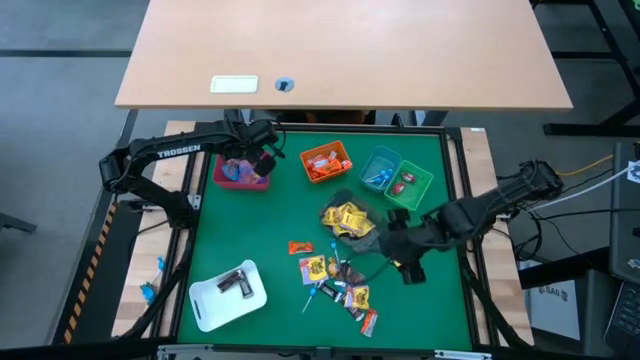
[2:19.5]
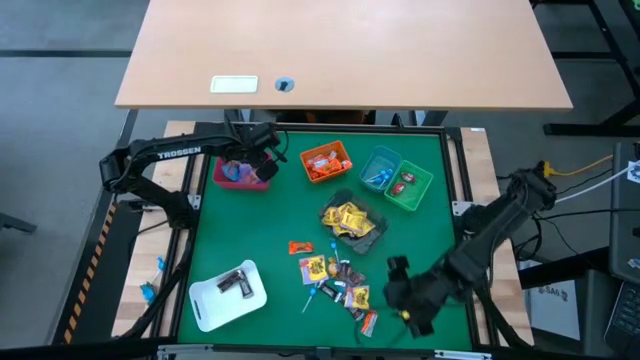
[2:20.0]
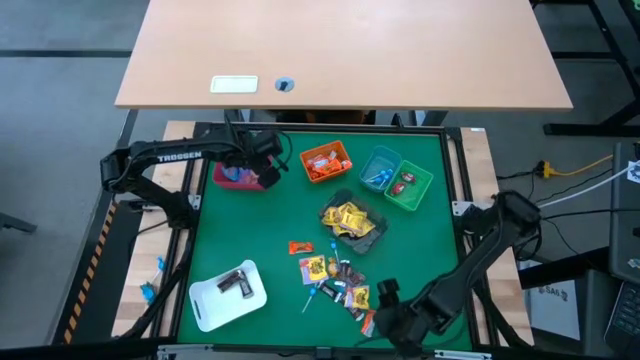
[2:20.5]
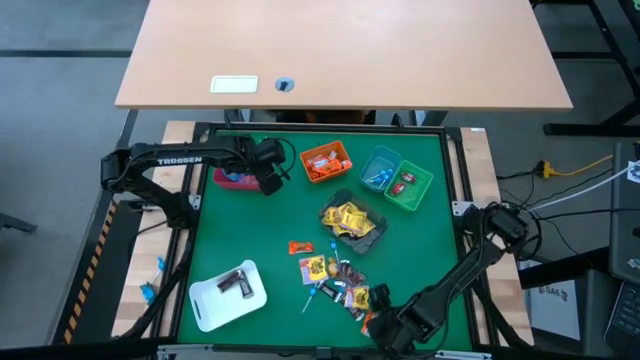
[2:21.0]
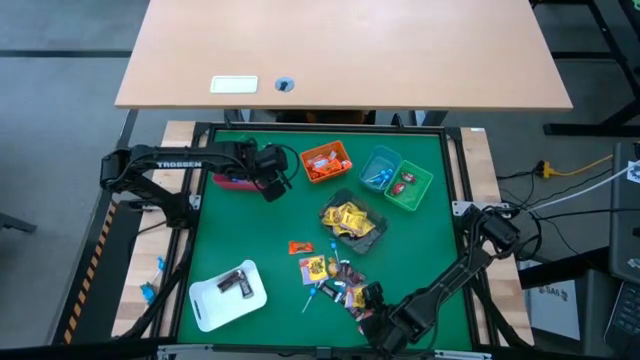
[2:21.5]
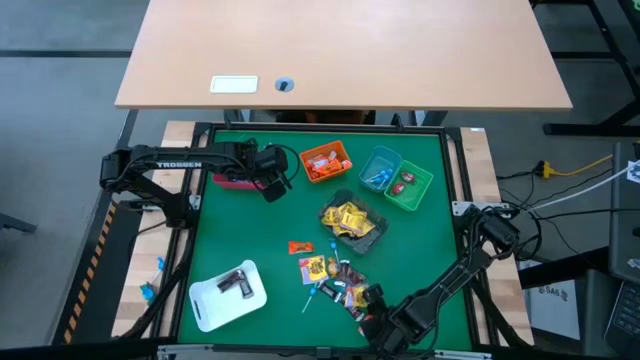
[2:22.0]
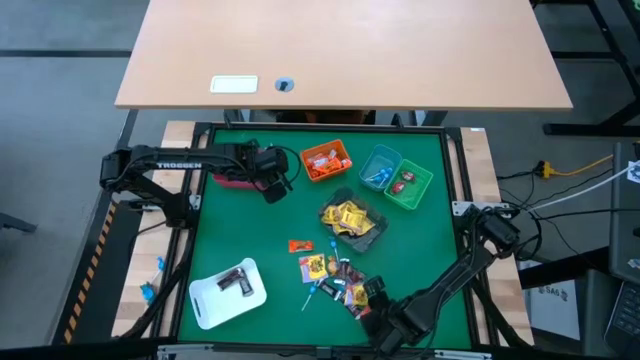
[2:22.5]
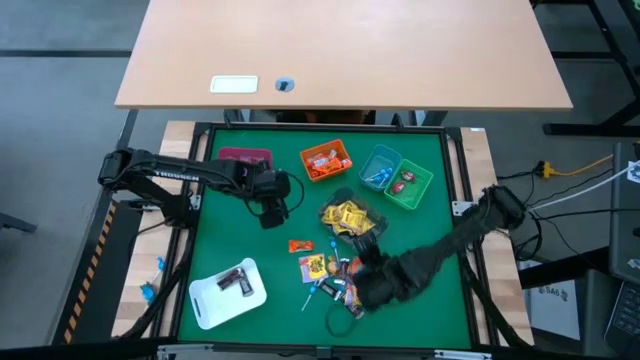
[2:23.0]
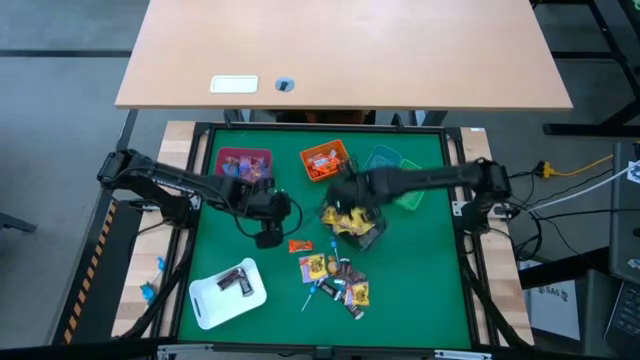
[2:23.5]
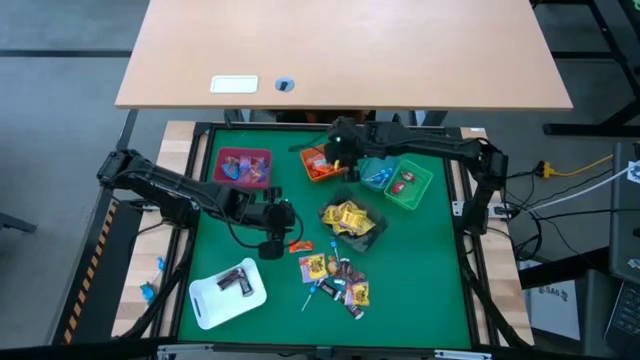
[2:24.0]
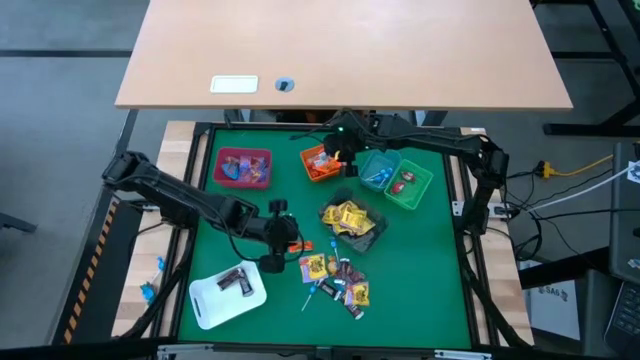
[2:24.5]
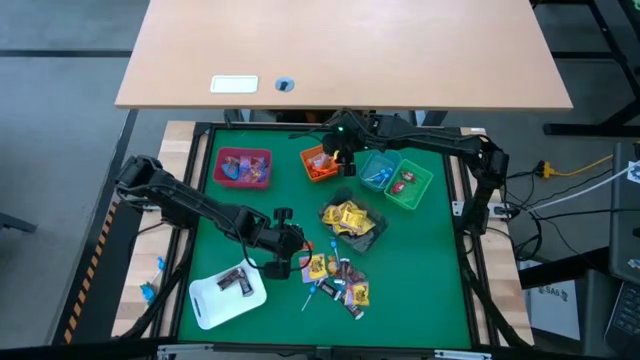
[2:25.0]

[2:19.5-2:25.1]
Task: Sort candy
Put the orange chocolate into the orange bin

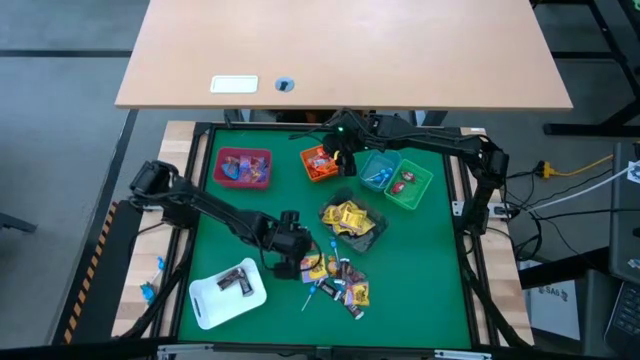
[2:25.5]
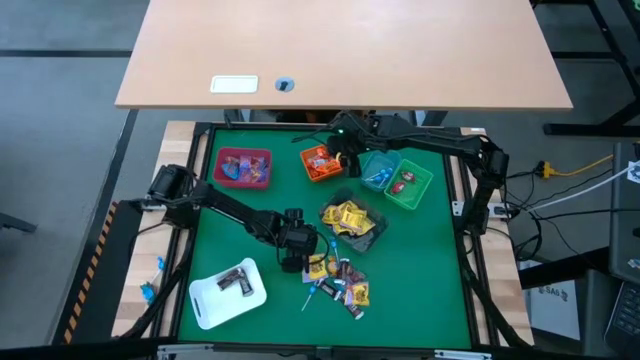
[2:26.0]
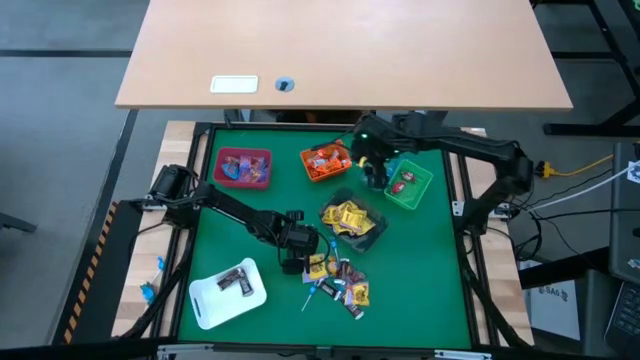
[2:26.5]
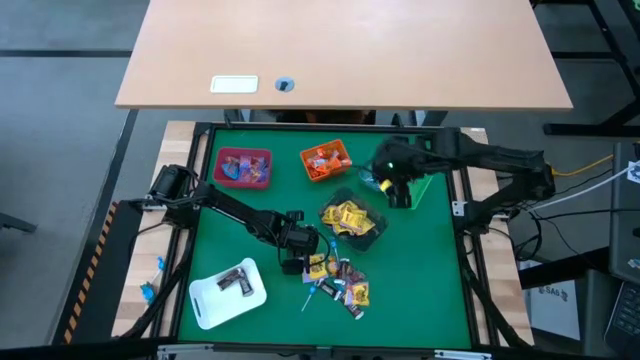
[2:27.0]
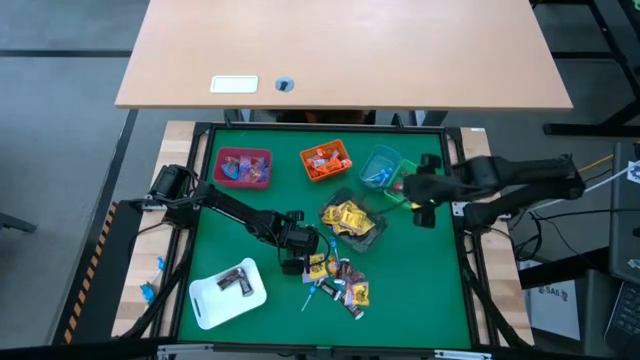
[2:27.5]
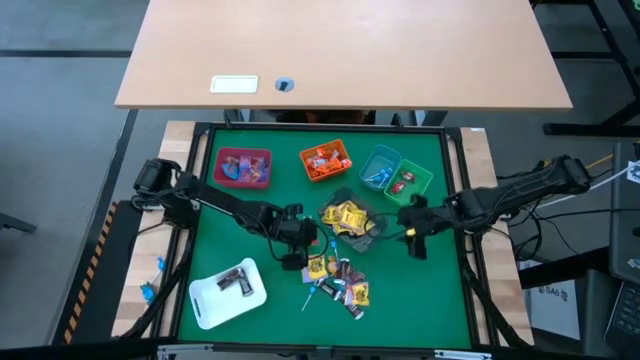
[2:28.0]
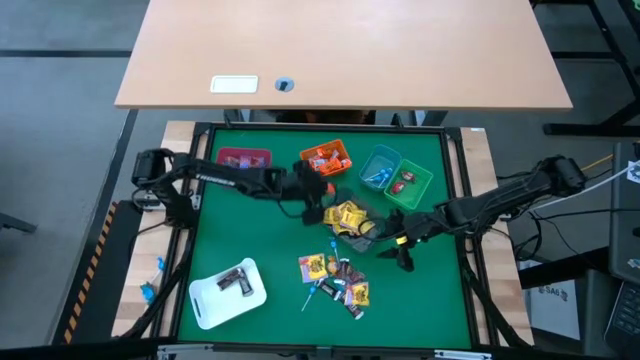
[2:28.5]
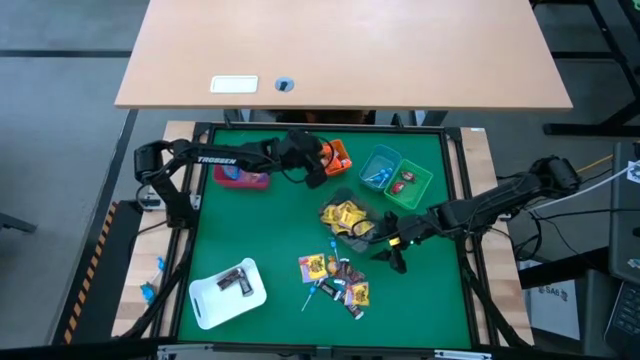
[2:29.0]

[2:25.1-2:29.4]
Put the orange chocolate into the orange bin

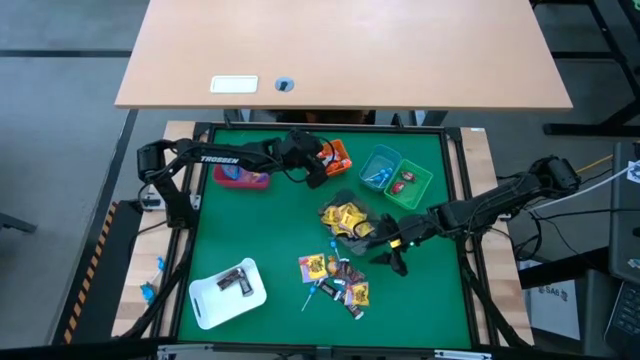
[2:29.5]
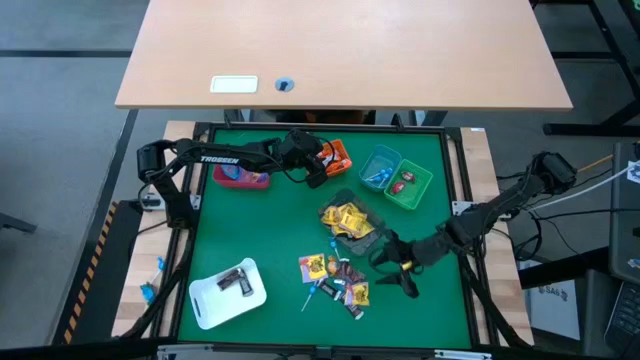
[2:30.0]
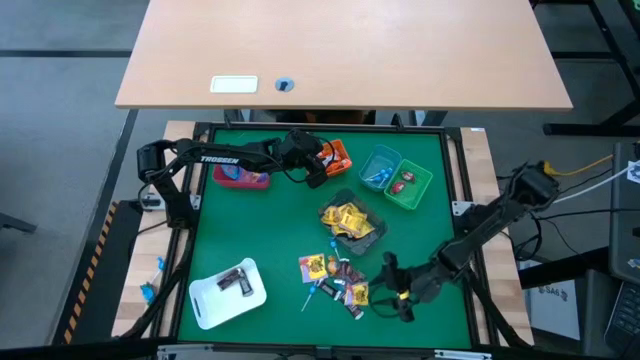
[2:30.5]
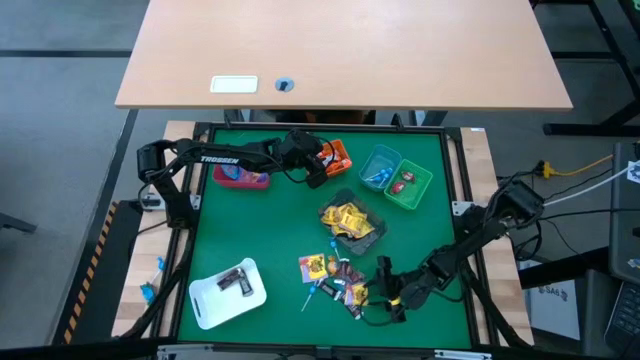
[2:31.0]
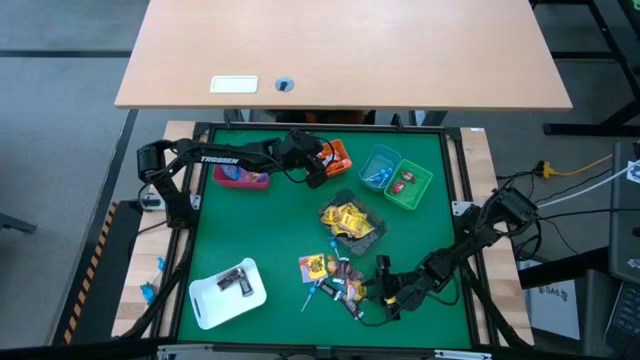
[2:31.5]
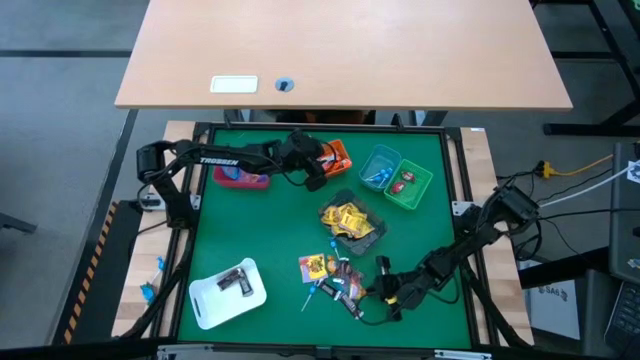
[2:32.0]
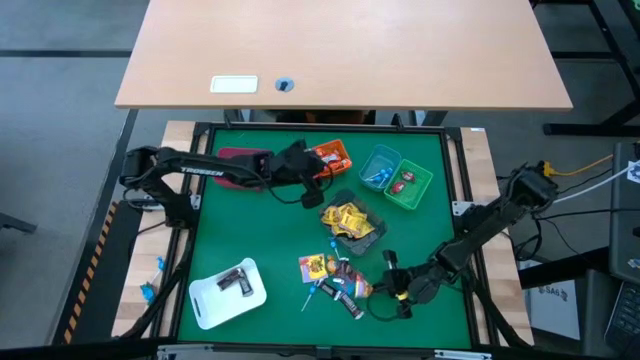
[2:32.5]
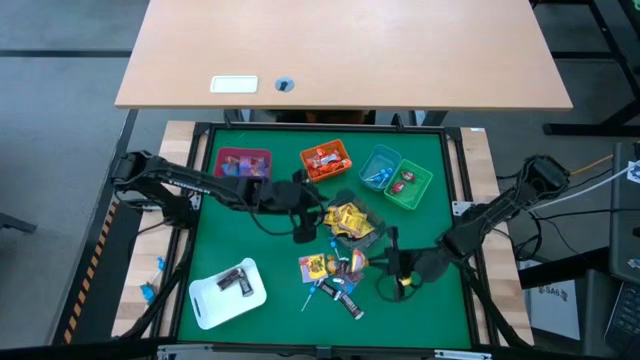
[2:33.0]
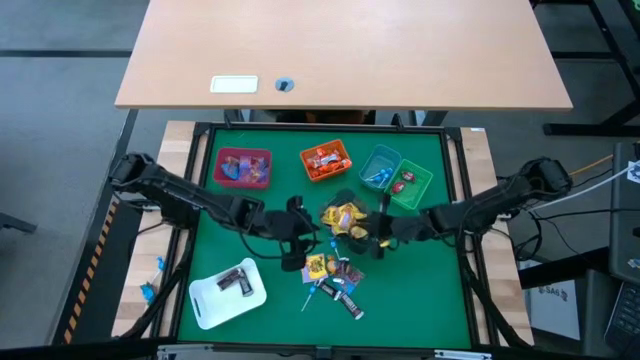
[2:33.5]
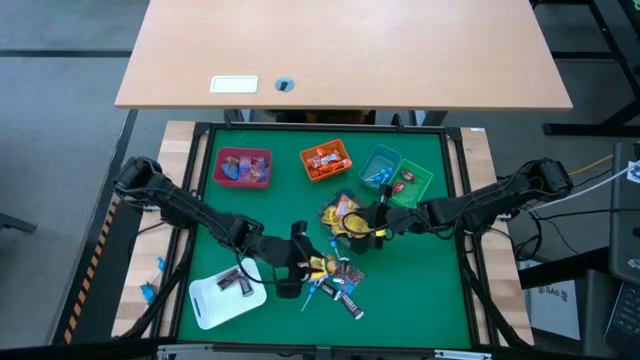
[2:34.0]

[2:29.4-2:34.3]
Put the yellow candy pack into the black bin

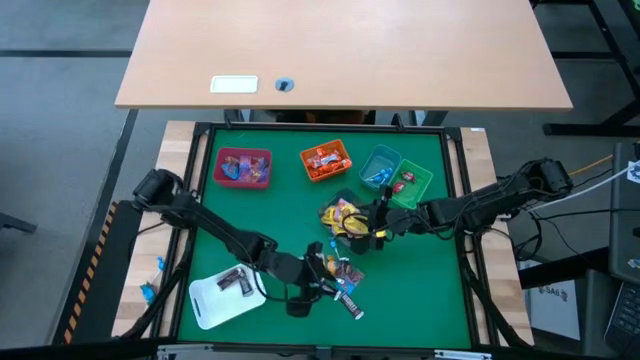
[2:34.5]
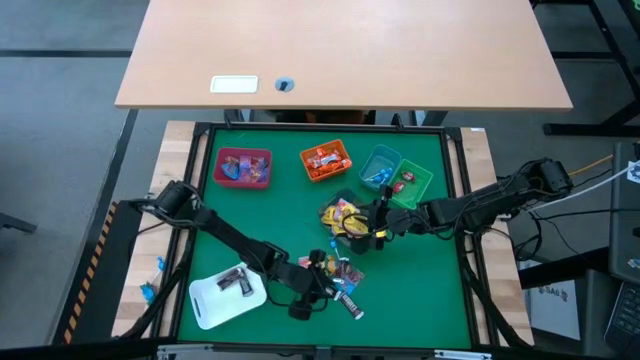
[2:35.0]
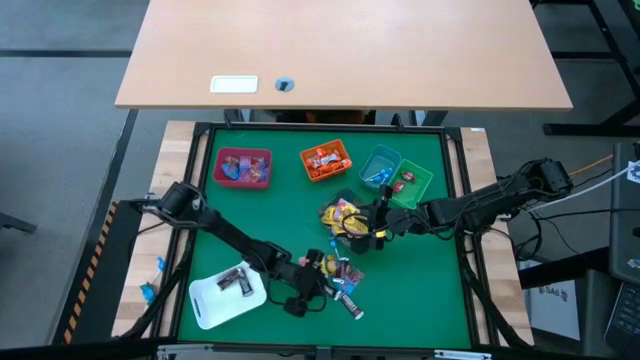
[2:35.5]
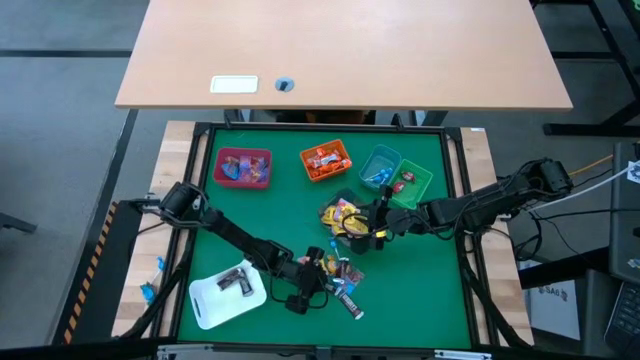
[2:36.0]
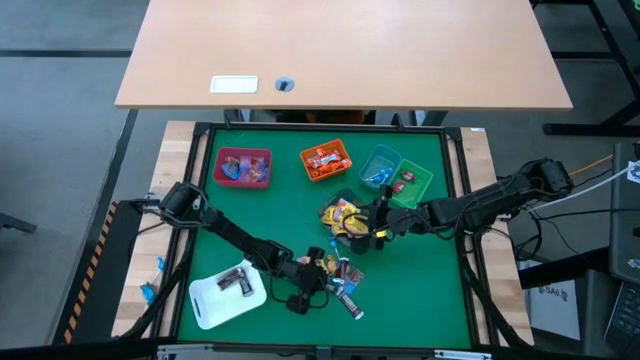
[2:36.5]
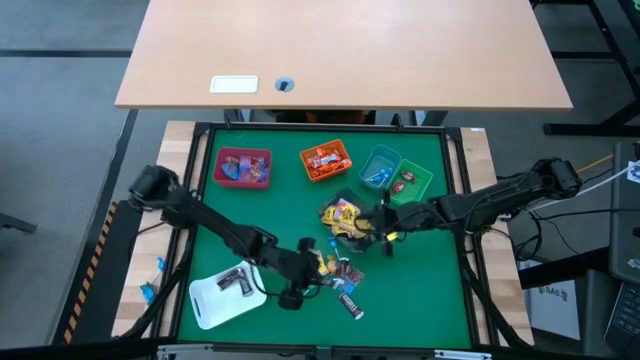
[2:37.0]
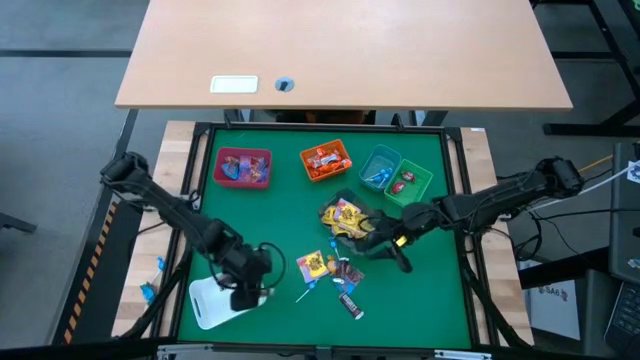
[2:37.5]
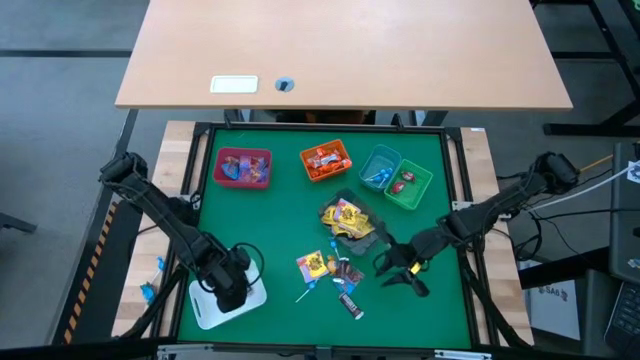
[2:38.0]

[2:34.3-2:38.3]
Put the brown chocolate into the white bin

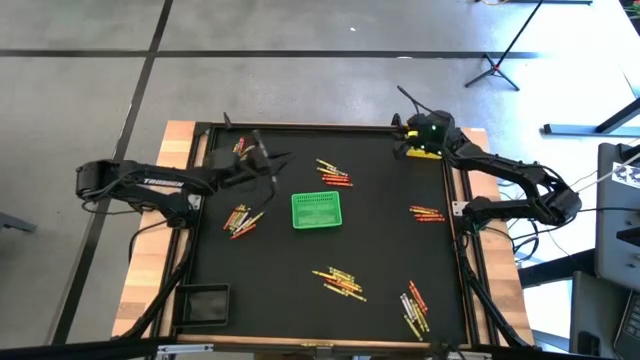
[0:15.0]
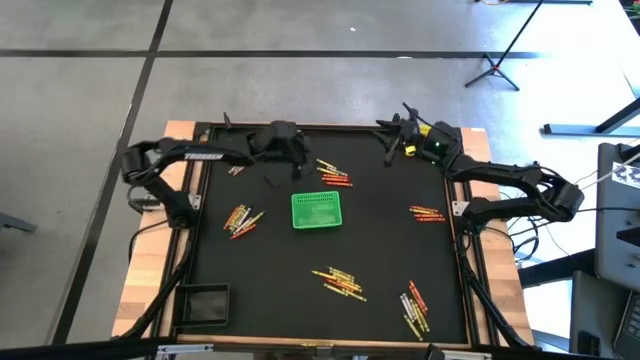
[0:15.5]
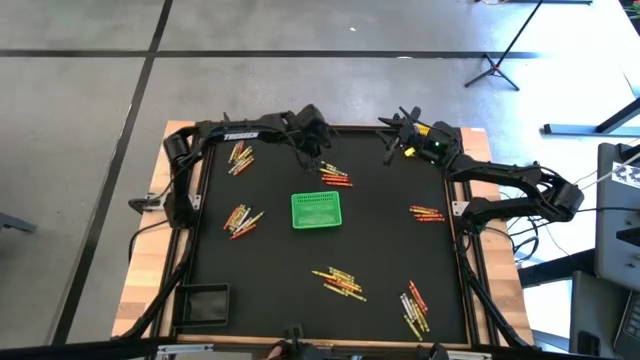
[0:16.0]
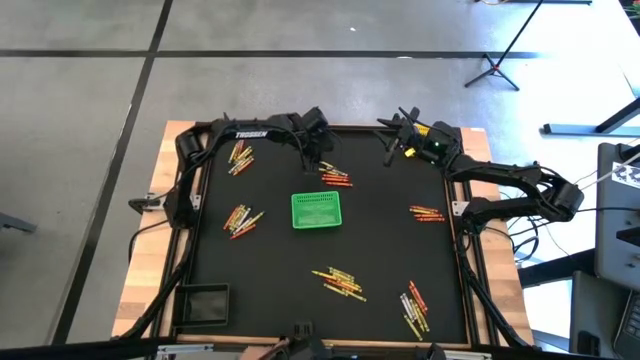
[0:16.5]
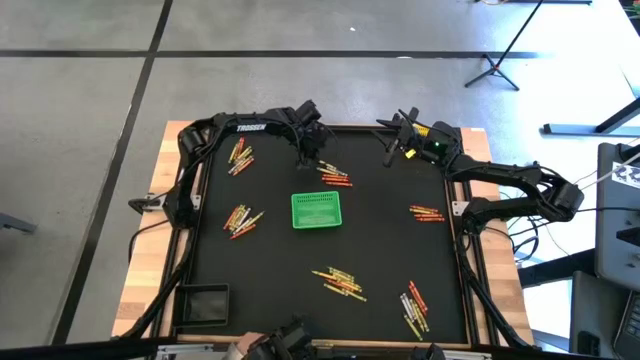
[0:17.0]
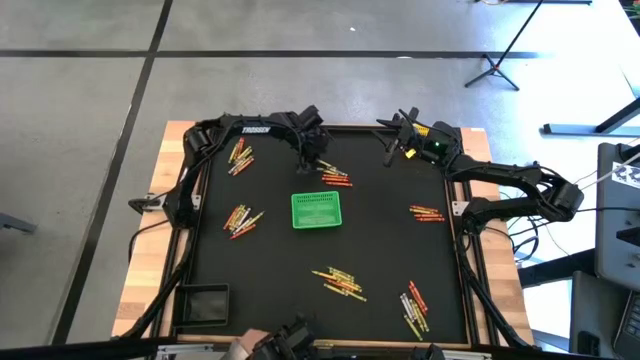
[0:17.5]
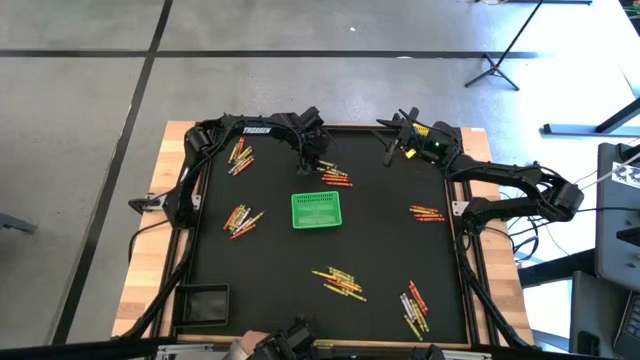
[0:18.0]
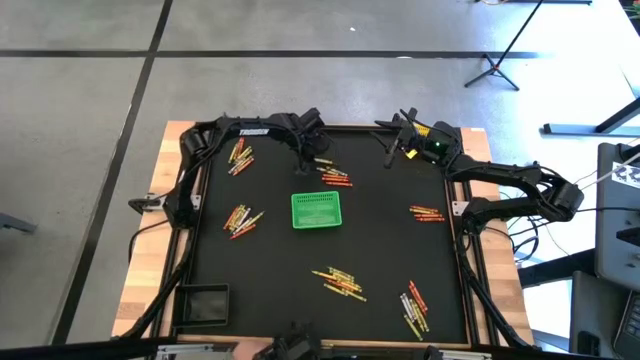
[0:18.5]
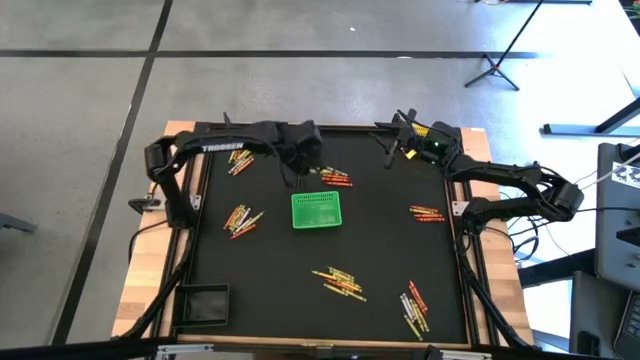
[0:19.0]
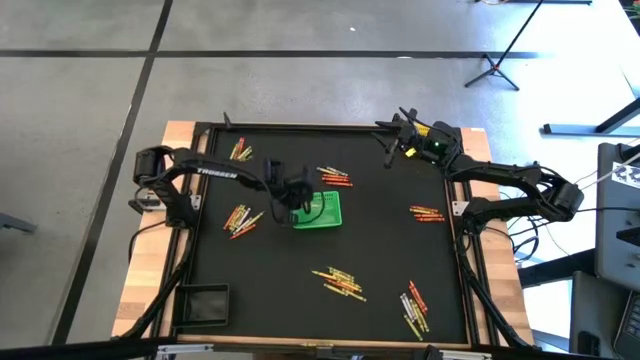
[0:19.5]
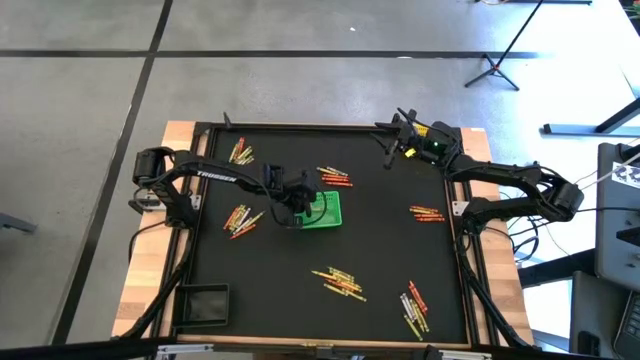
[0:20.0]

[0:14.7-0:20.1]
Task: Sort crayons
Put the green crayon into the green bin
